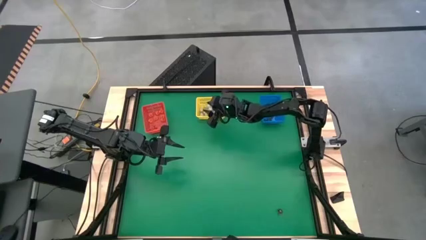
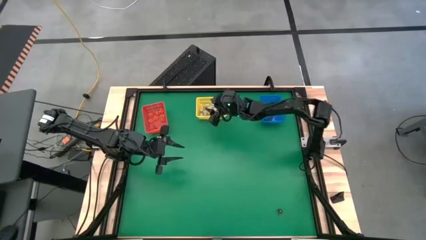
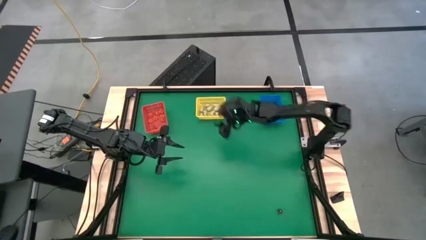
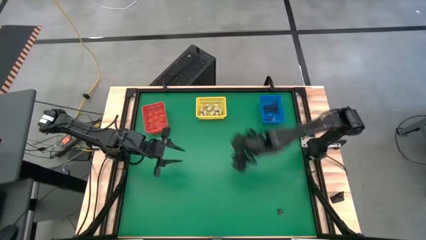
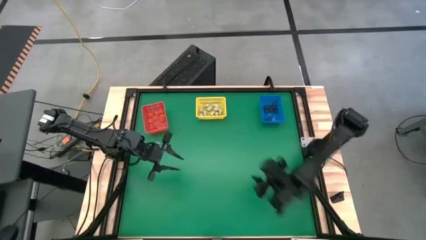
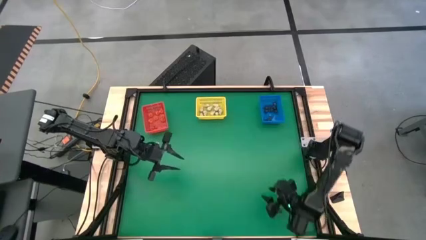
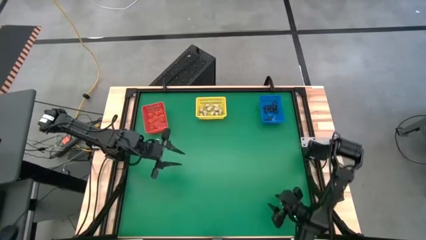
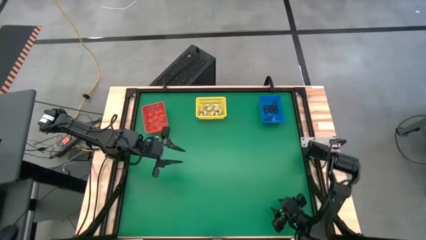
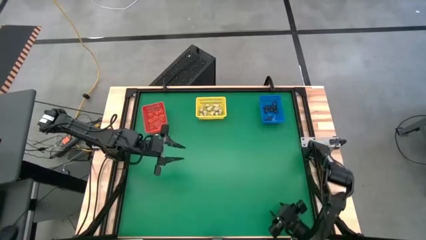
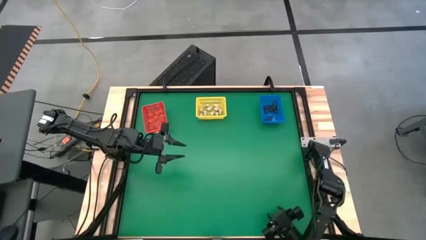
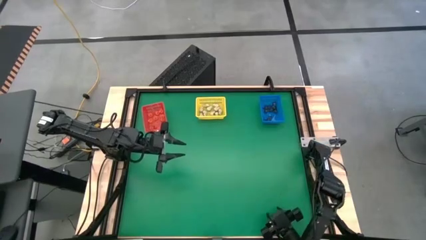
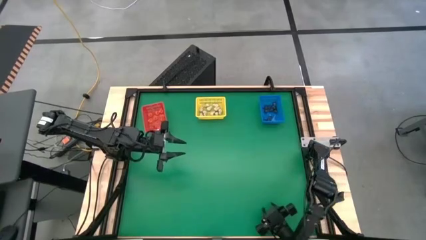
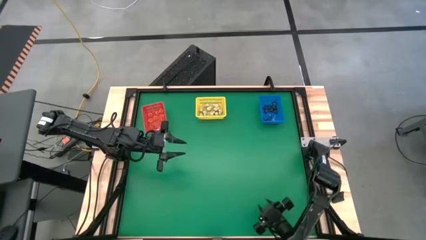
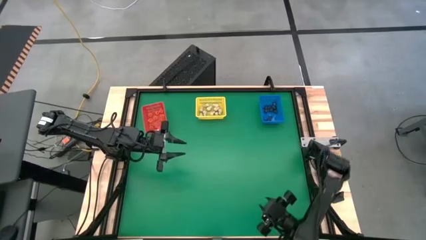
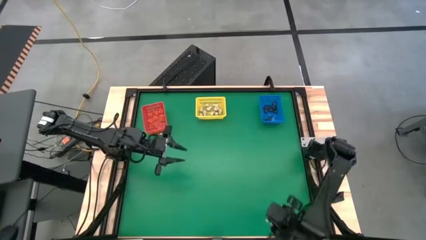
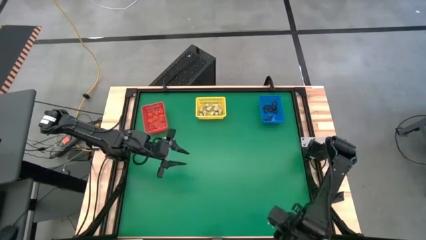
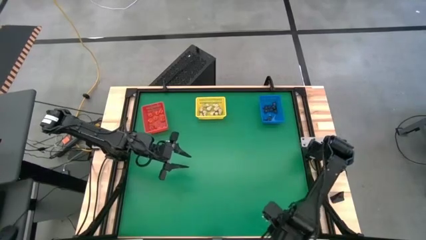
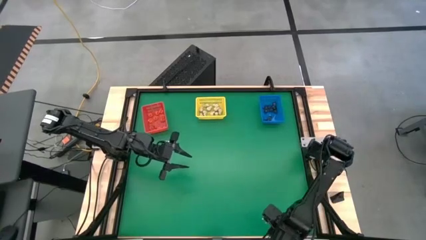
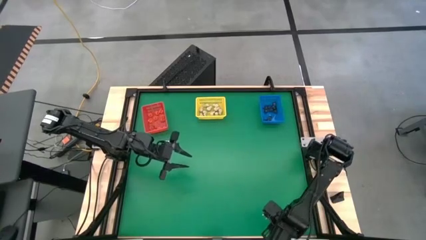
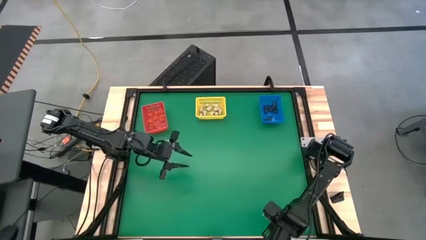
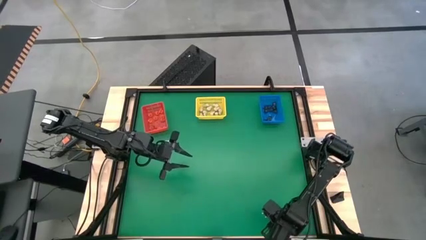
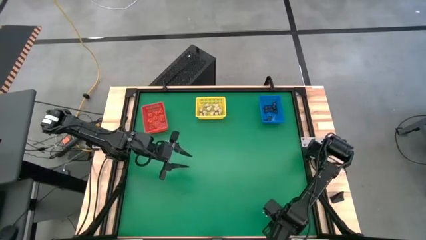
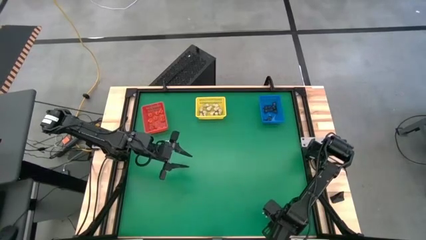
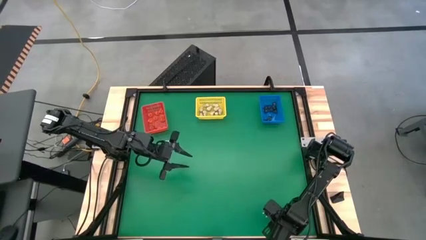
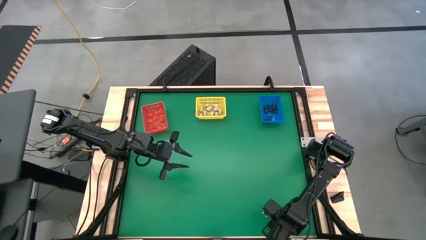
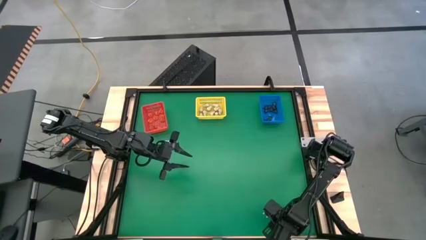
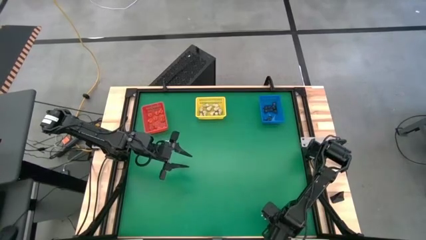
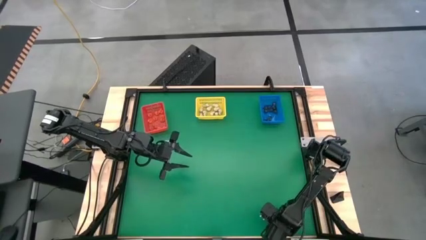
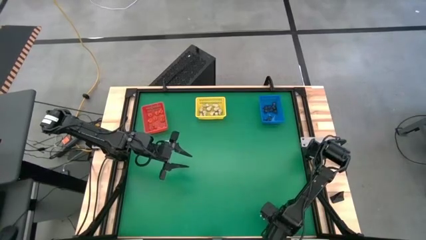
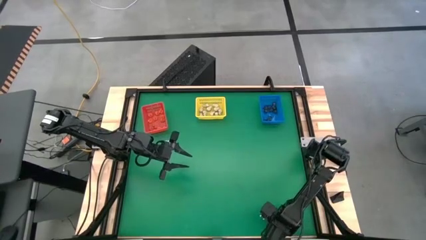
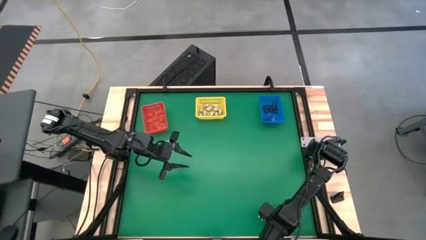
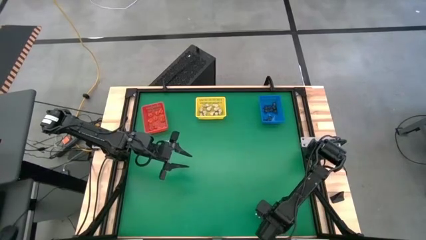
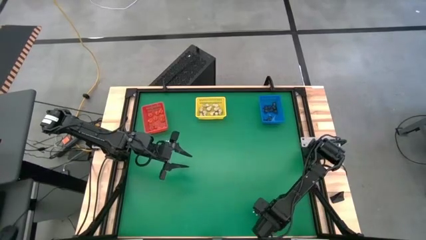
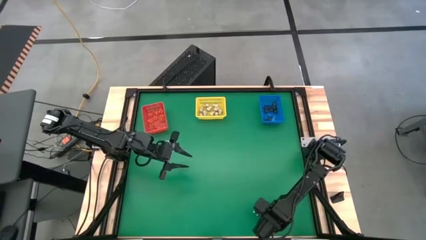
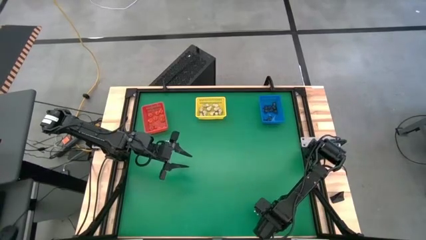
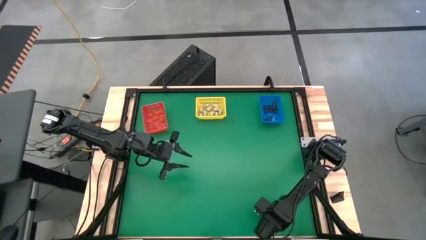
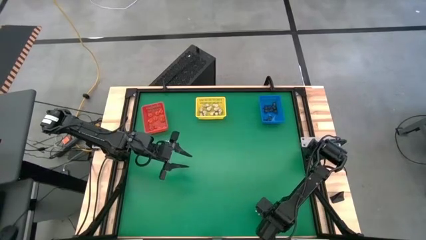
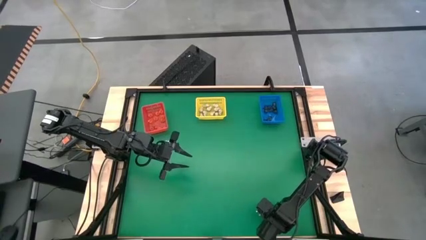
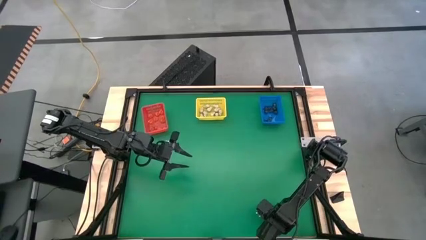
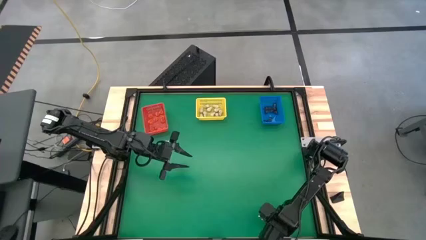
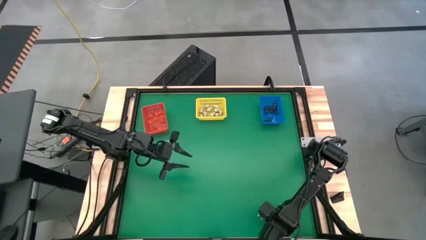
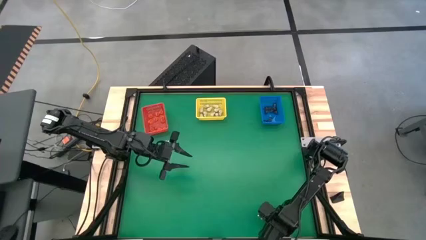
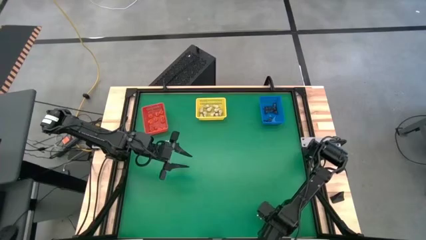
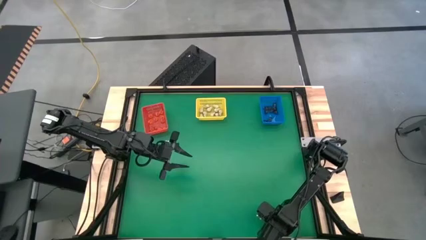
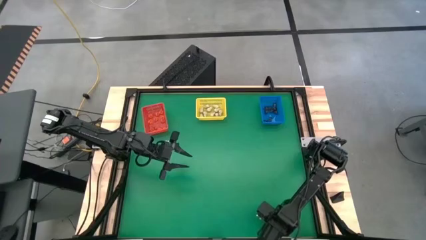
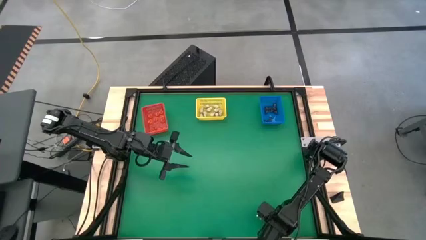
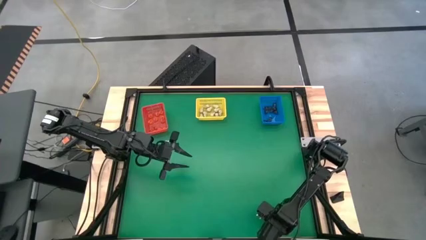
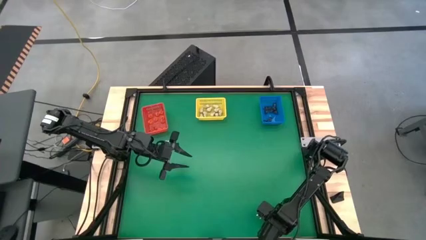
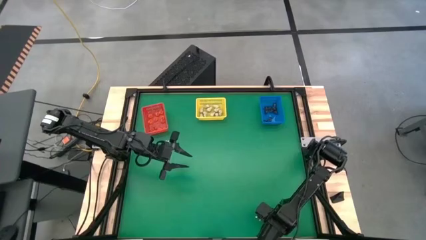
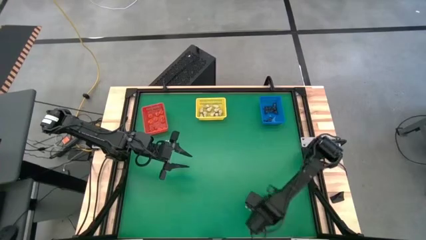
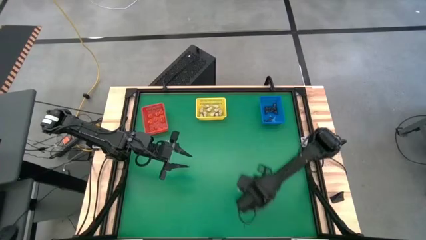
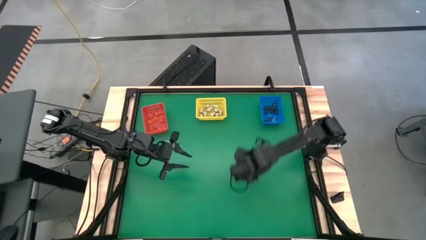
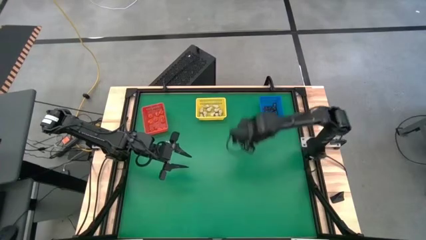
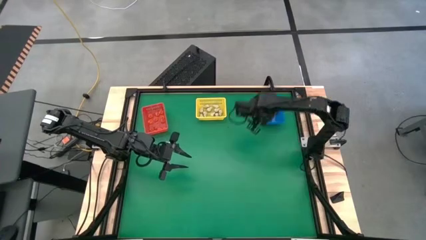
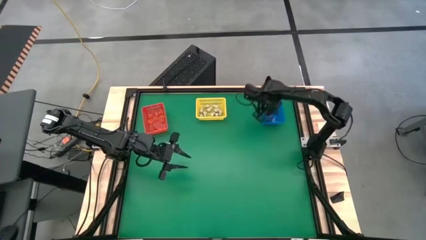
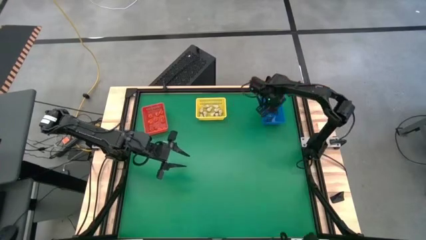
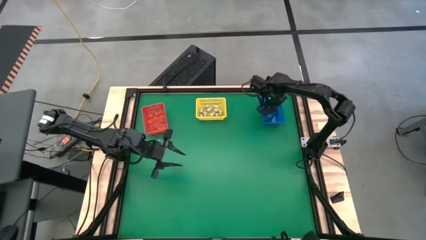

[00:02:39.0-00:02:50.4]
Task: Sort Halloween decoration
Put the purple skull toy into the blue bin

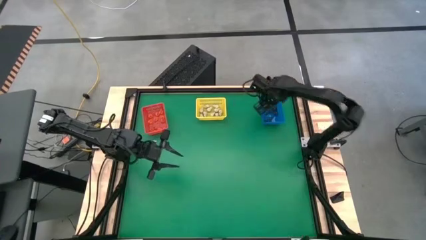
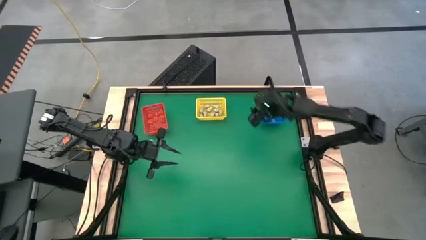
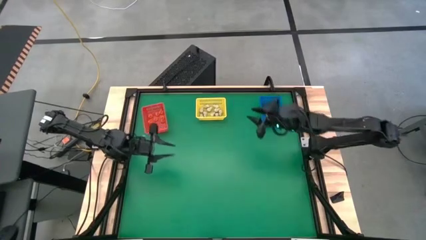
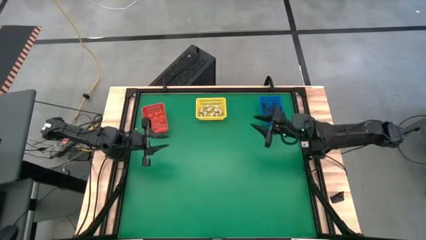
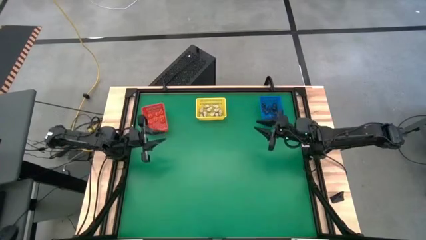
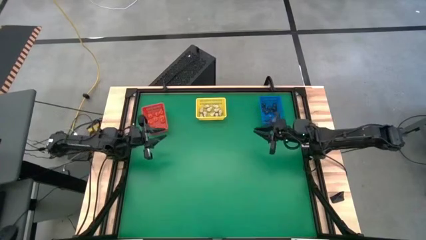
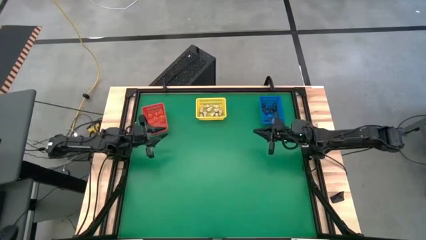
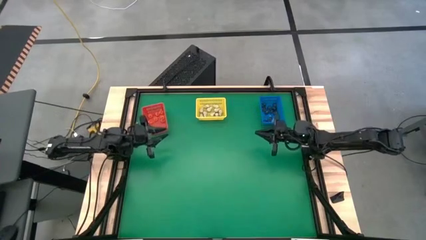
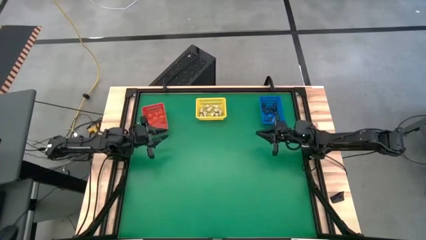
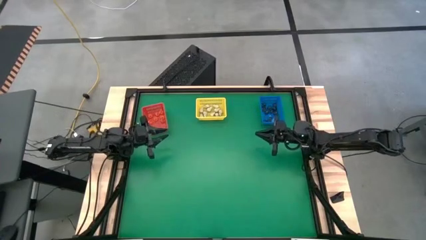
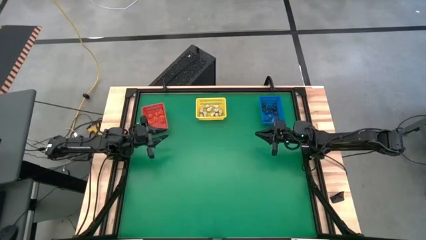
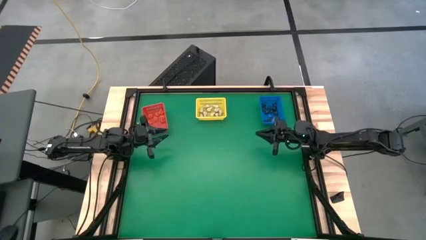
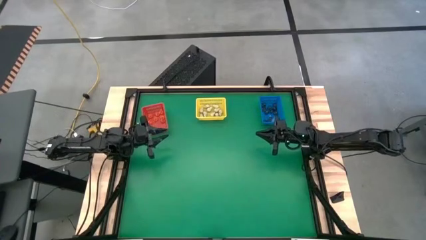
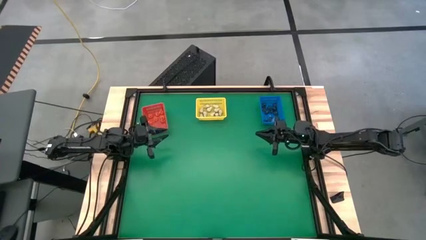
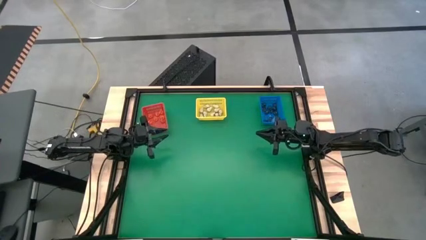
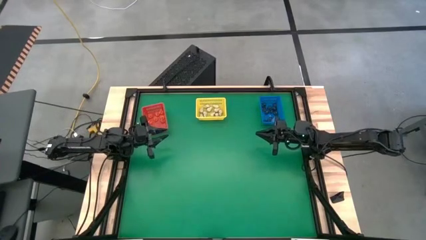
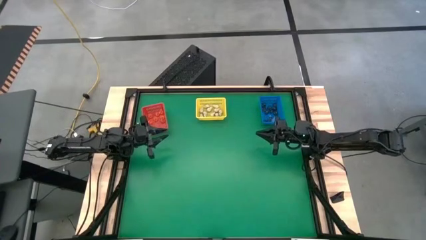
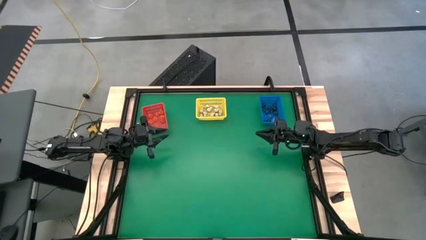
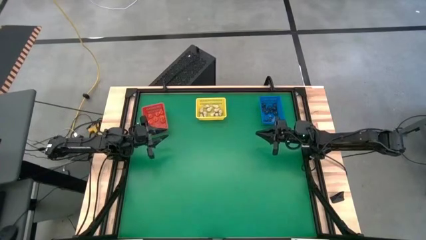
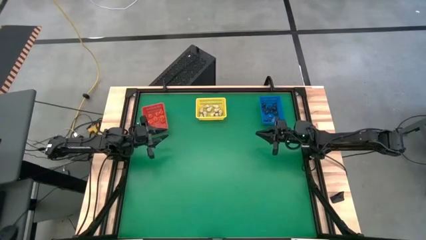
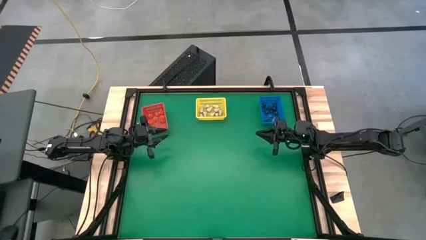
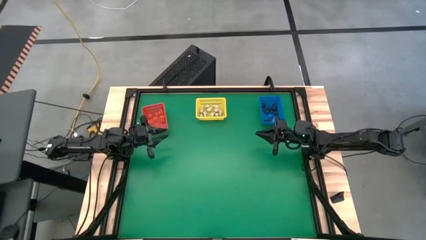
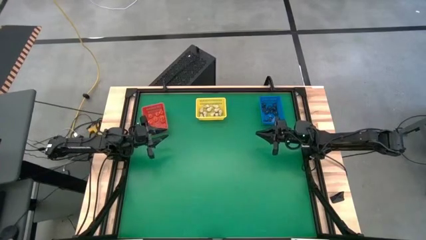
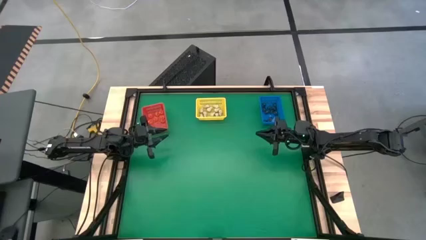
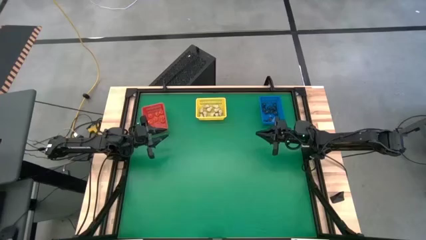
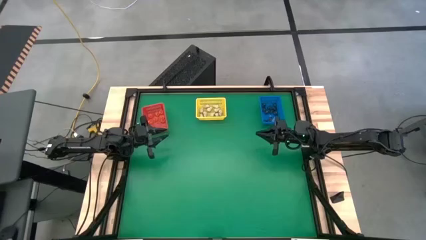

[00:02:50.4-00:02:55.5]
Return to Home Position
